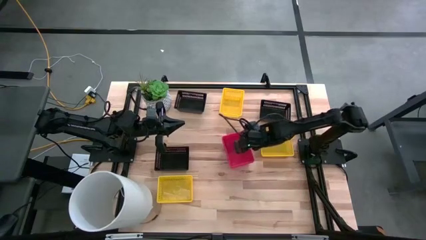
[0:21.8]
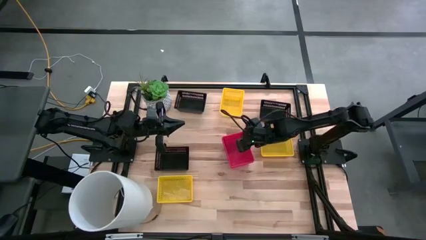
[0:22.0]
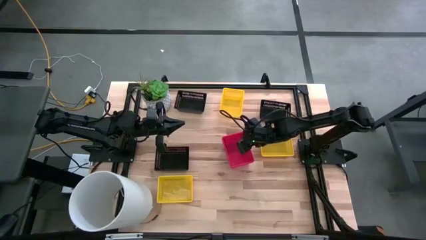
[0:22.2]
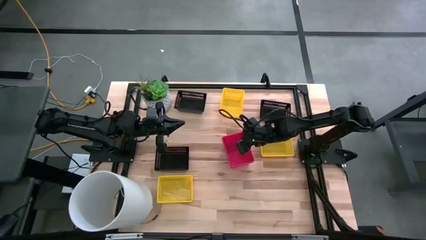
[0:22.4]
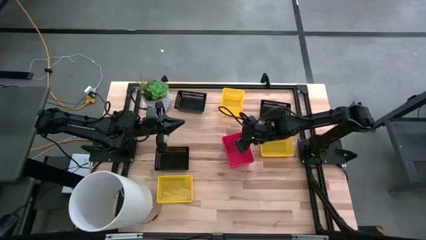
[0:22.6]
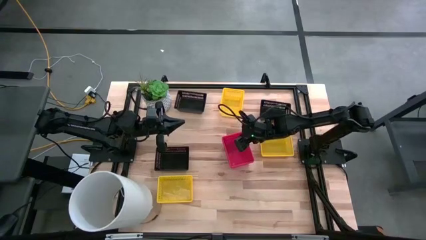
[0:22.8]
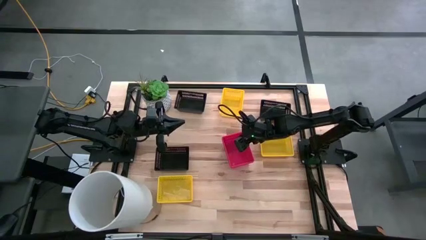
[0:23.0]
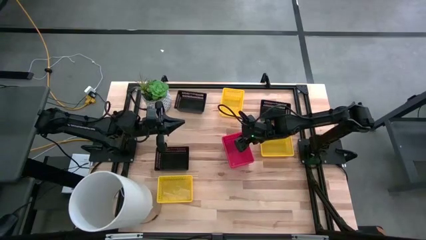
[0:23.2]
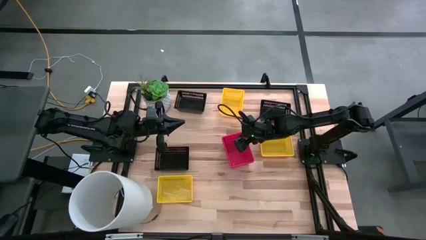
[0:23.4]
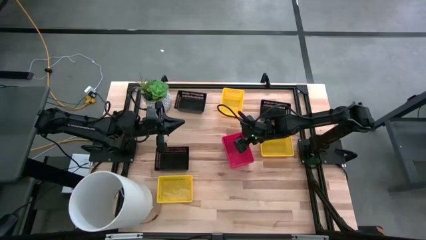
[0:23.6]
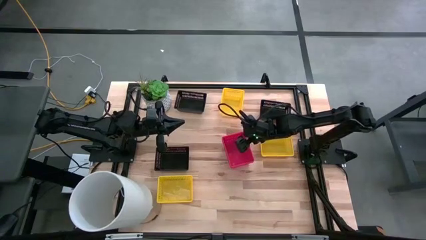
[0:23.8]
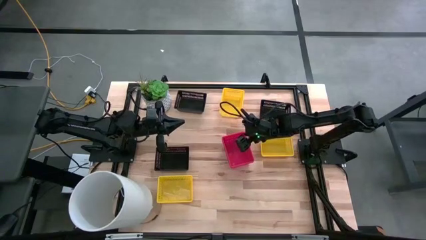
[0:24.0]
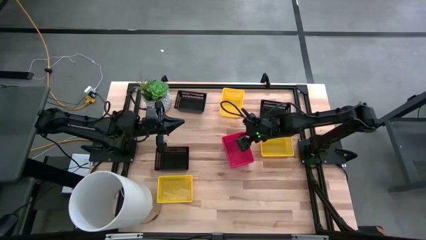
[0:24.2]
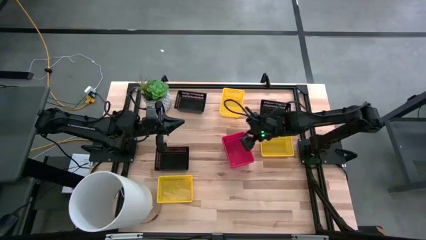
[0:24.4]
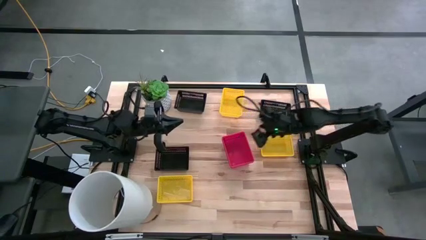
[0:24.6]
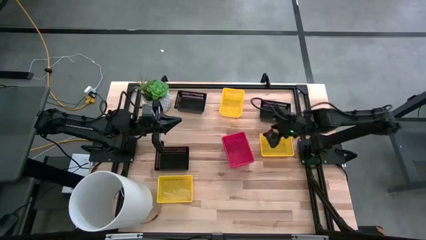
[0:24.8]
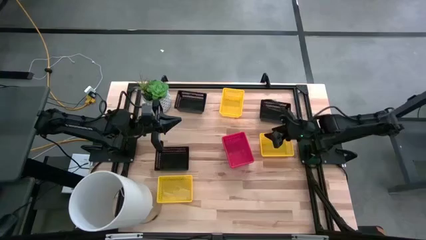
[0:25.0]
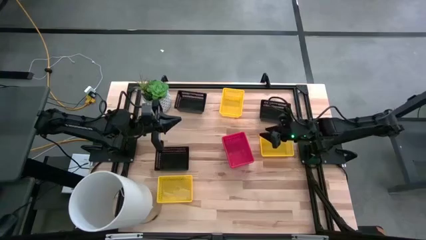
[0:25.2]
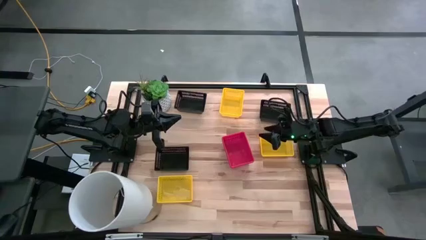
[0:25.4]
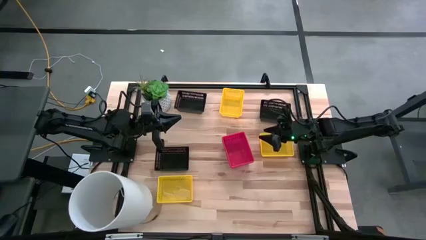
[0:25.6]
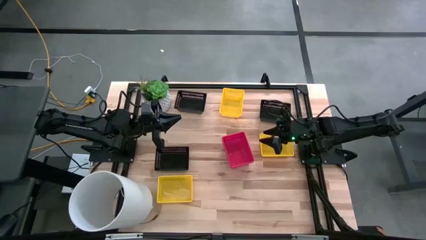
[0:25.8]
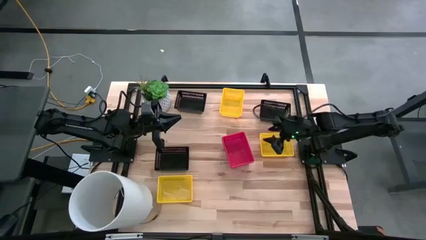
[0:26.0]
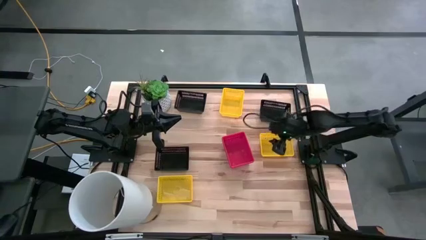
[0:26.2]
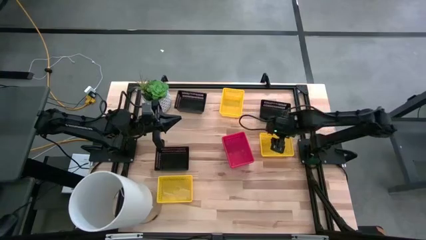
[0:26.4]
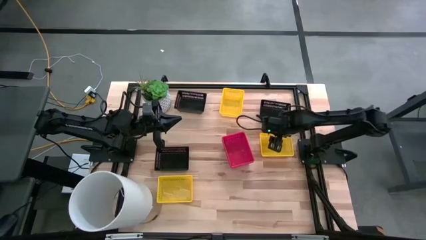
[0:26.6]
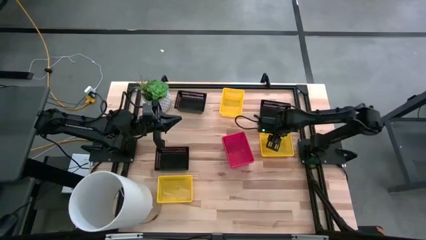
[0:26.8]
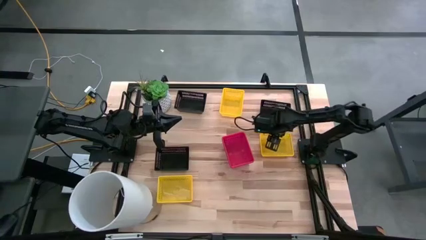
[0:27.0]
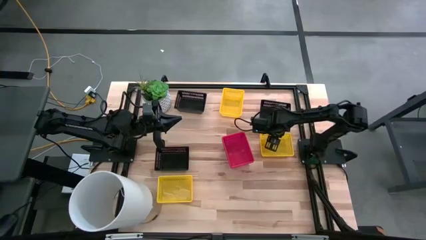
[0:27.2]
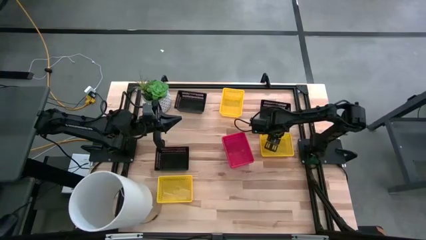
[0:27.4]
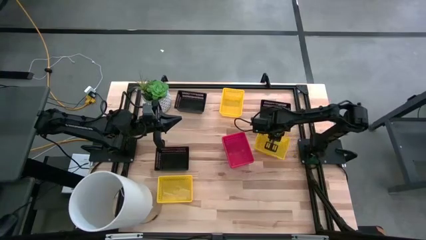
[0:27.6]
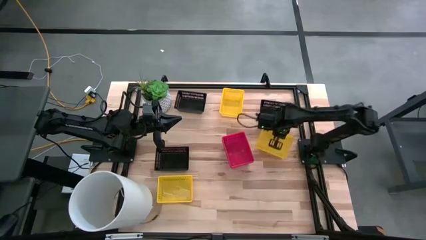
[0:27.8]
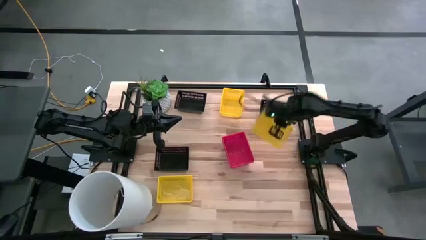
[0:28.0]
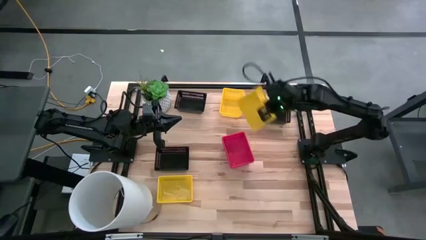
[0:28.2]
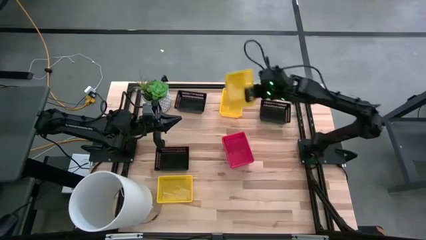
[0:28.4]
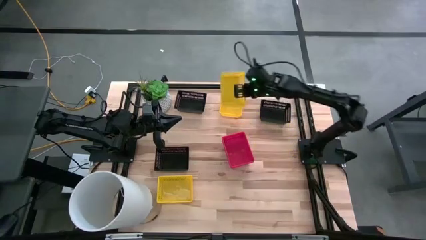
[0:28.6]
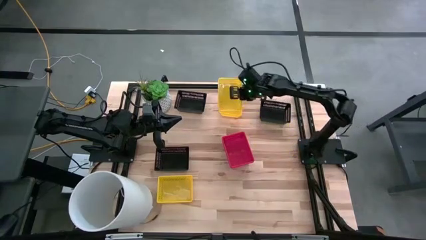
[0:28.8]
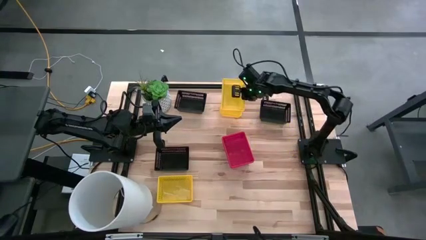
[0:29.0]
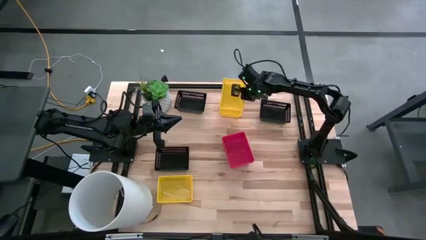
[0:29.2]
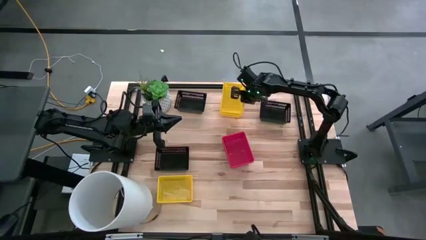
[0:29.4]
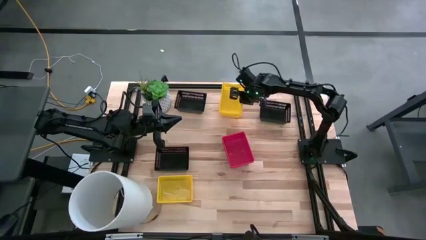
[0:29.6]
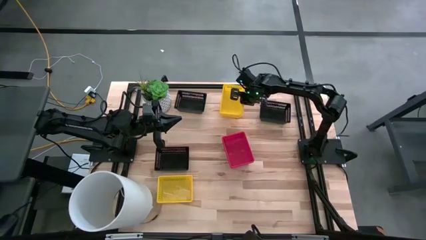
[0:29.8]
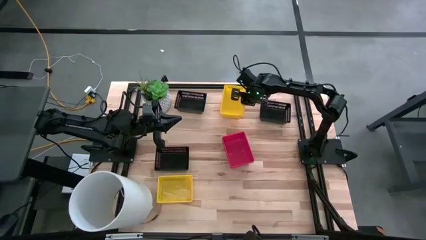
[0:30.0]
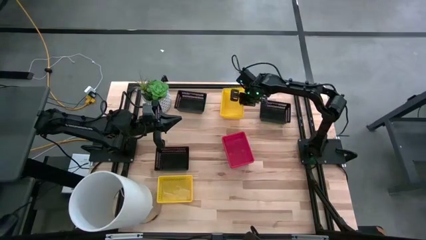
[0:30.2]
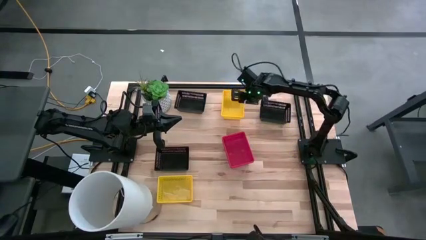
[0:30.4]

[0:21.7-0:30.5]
Stack the middle yellow bin on the yellow bin

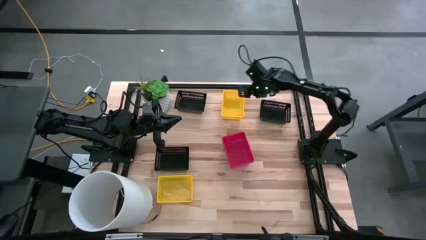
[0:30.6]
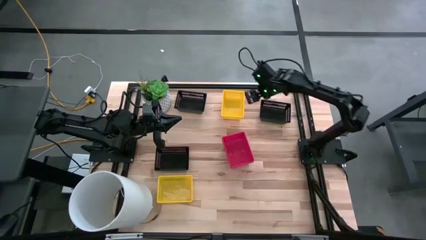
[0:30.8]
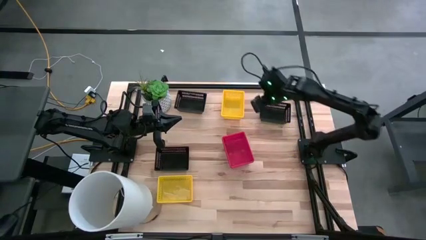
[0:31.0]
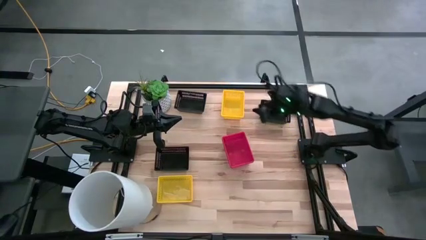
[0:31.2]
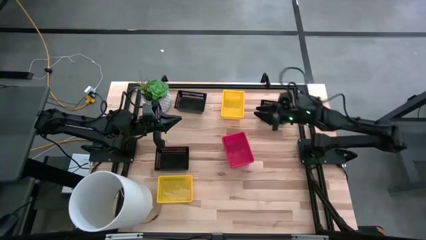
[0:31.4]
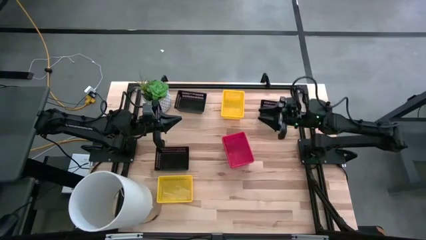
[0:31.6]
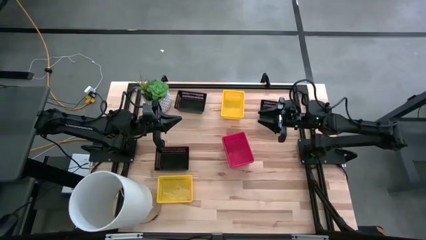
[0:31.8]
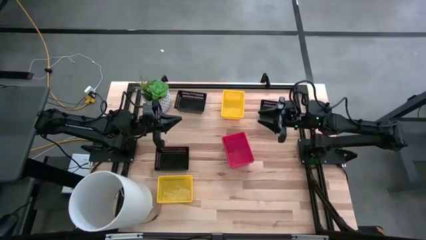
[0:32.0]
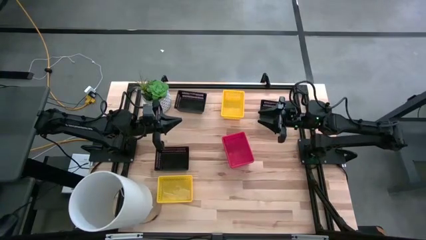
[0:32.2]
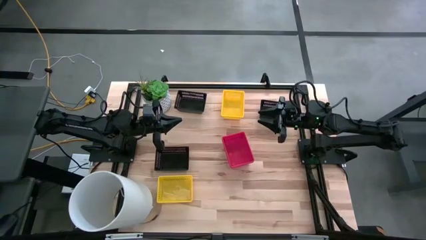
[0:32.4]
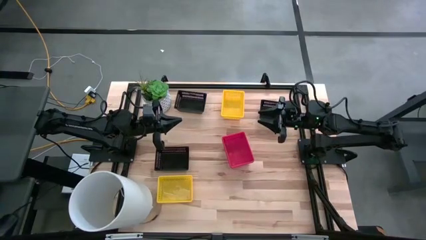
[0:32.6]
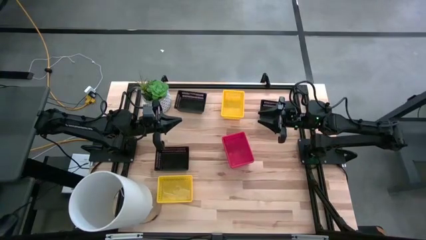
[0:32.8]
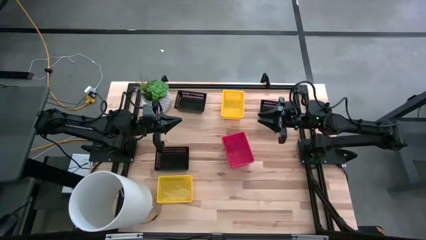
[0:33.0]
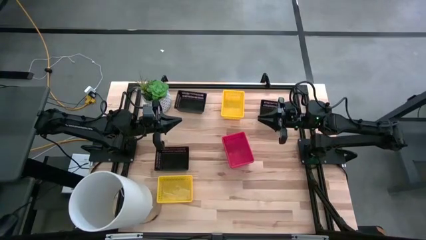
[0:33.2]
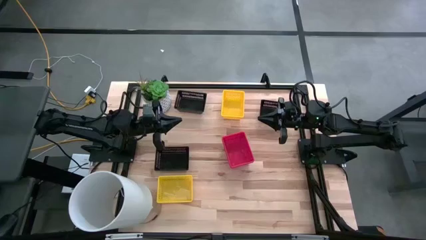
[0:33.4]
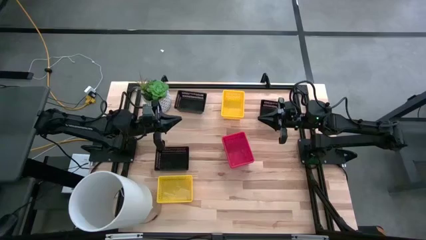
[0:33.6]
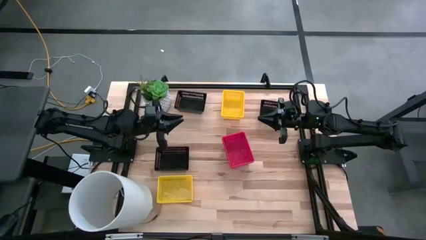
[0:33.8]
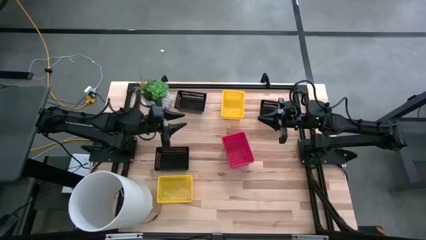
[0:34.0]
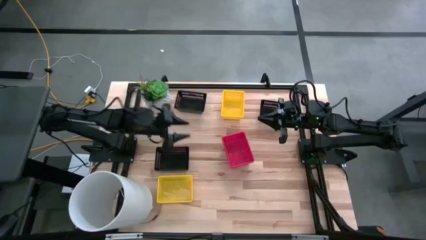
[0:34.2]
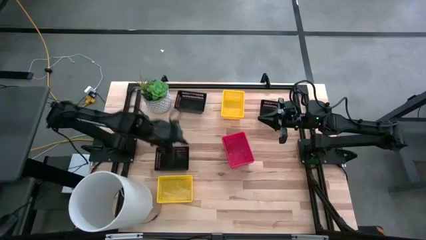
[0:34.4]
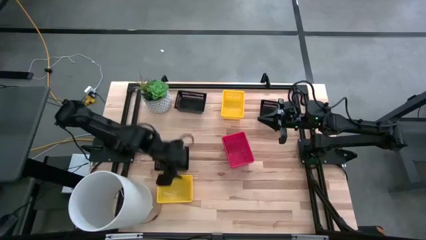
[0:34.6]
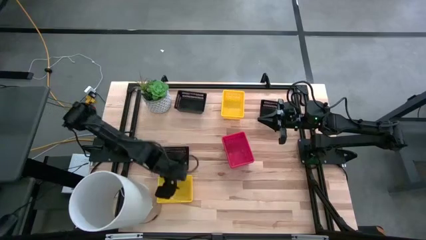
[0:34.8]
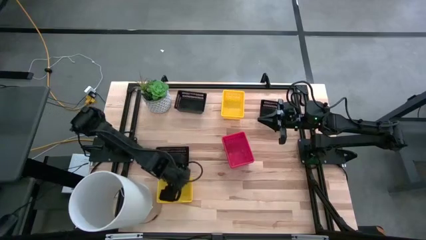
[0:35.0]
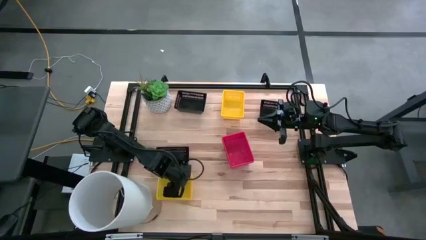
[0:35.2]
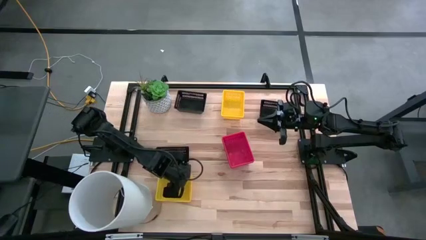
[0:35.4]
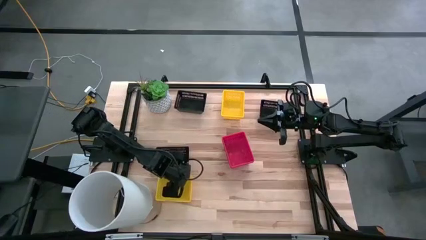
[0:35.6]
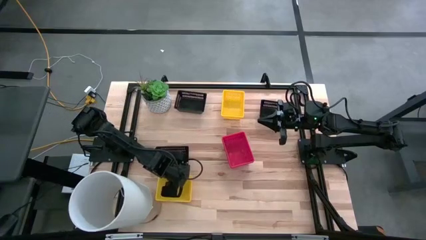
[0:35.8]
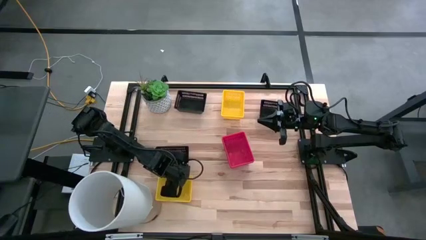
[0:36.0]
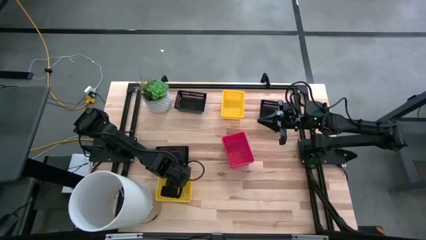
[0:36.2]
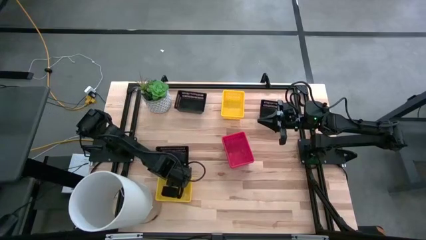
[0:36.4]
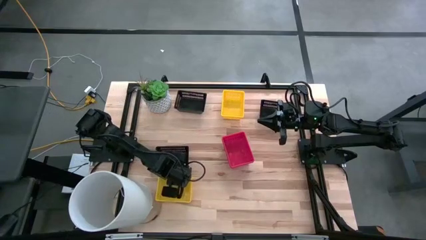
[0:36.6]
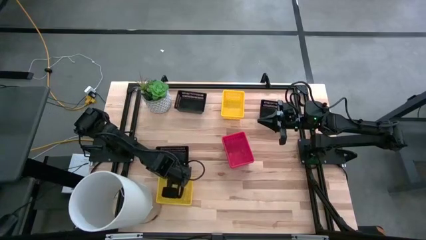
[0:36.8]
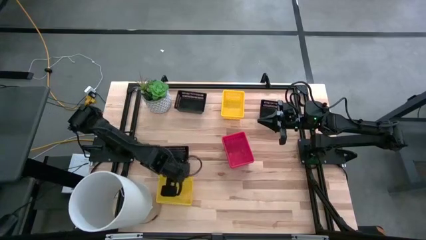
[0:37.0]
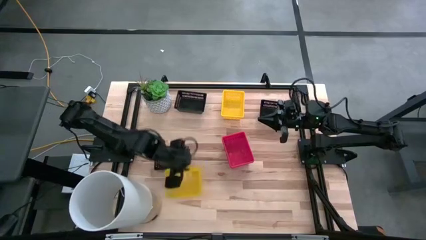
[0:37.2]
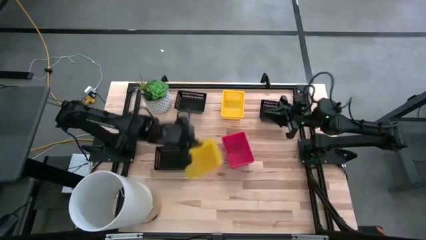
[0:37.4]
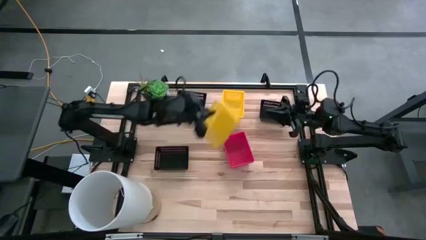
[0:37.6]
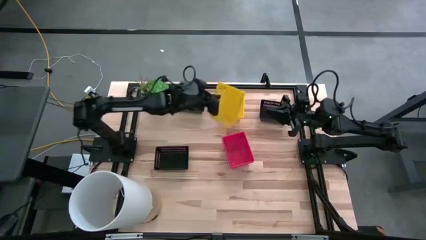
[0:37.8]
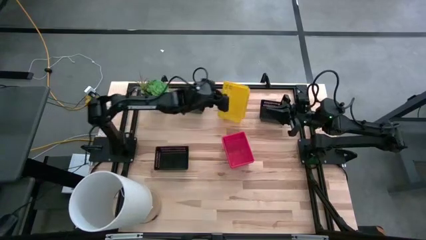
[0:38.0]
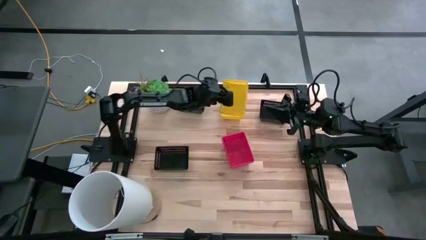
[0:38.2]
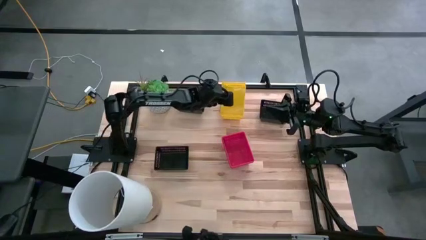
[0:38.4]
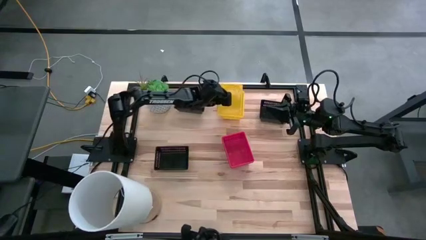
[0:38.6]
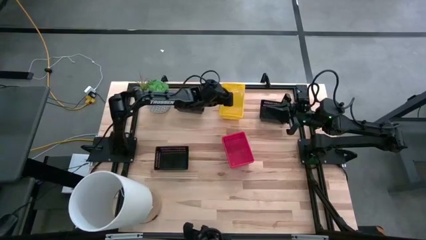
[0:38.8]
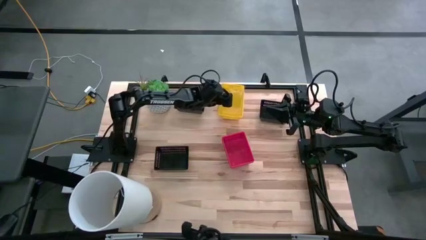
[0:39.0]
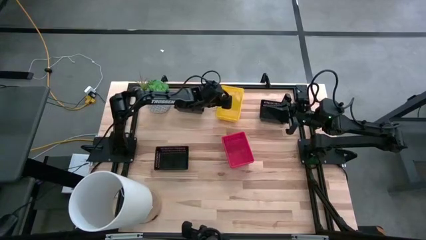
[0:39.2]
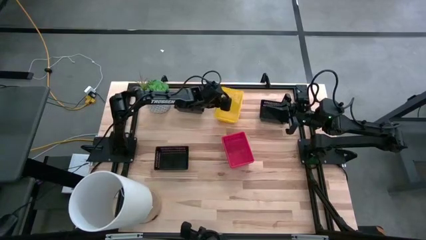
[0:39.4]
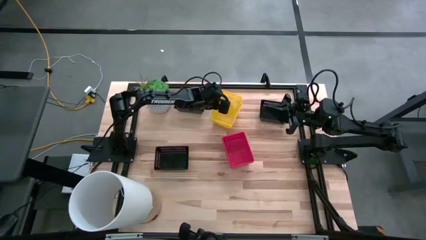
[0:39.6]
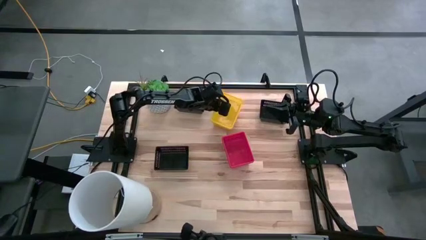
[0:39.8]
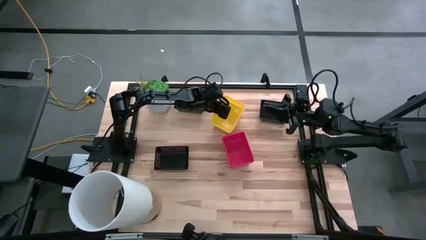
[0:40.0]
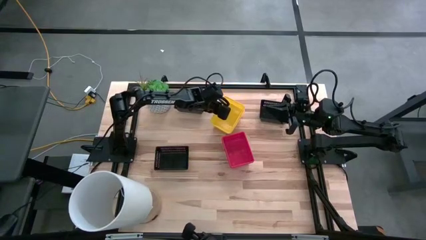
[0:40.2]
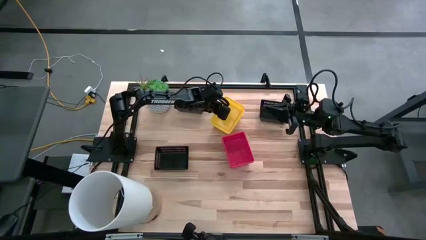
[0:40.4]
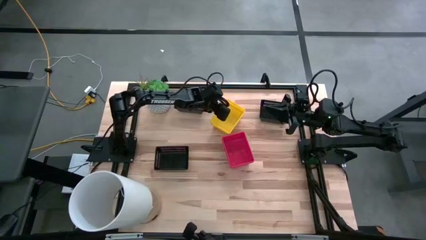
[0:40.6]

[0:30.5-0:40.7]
Stack the yellow bin on the yellow bin
